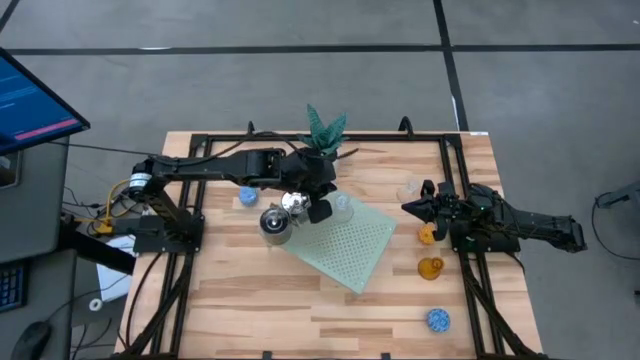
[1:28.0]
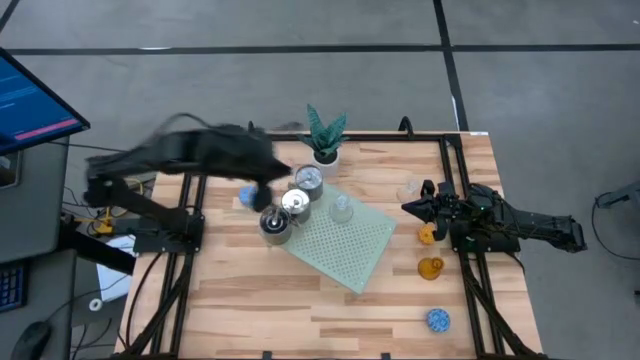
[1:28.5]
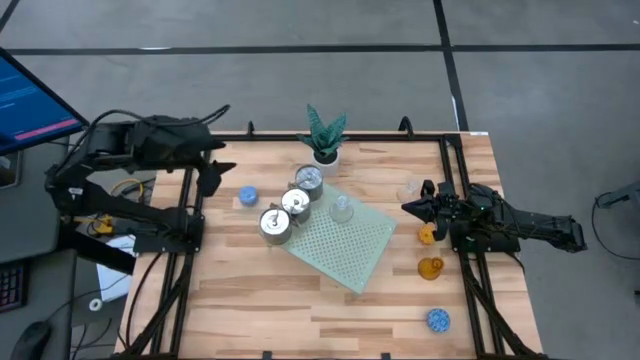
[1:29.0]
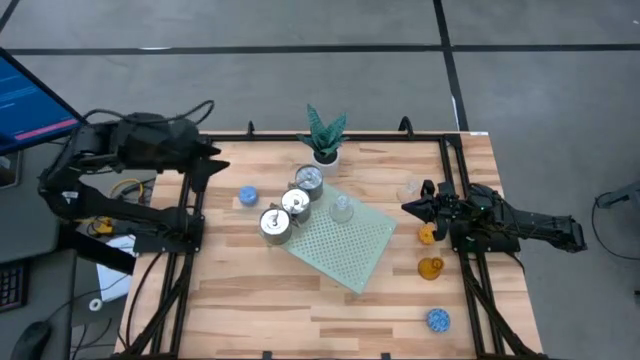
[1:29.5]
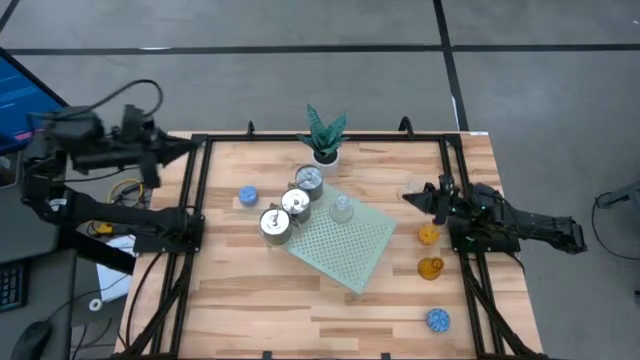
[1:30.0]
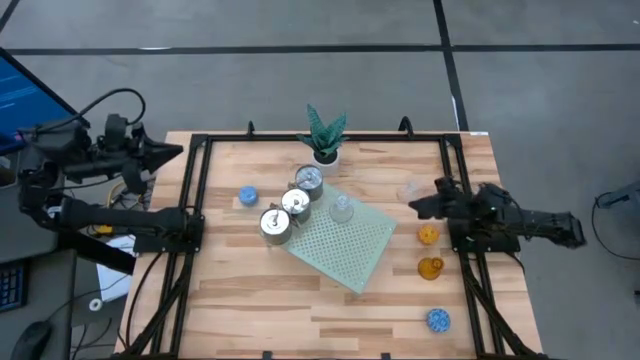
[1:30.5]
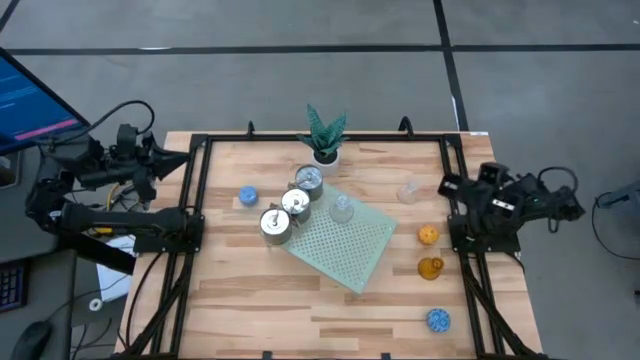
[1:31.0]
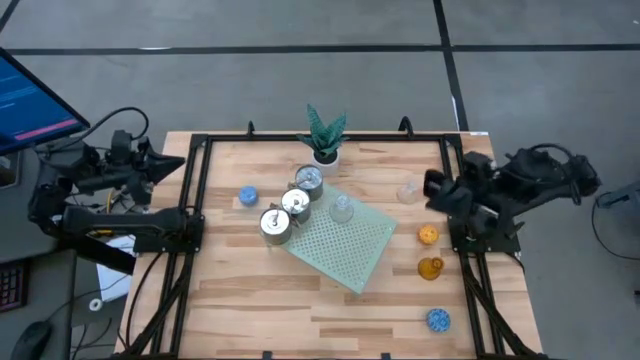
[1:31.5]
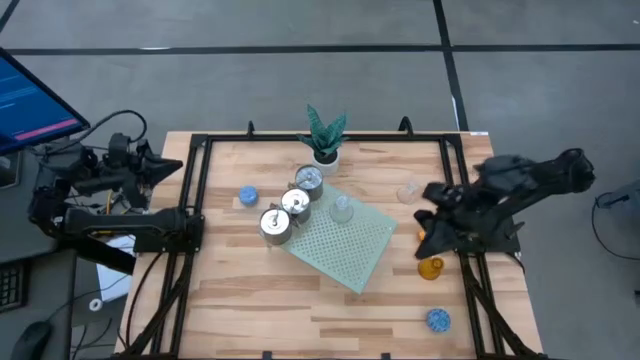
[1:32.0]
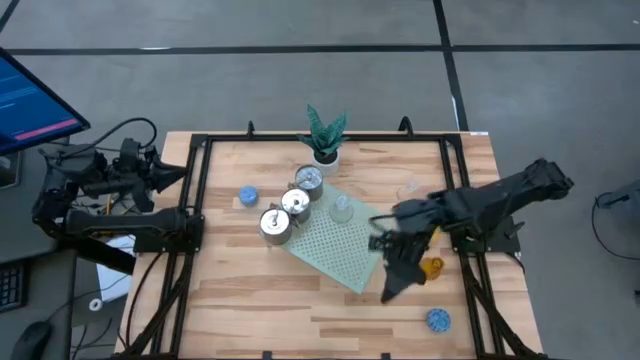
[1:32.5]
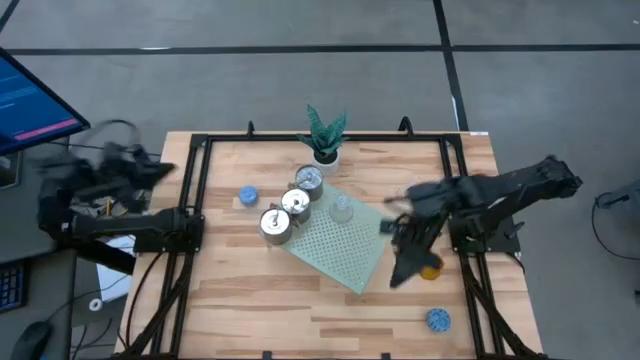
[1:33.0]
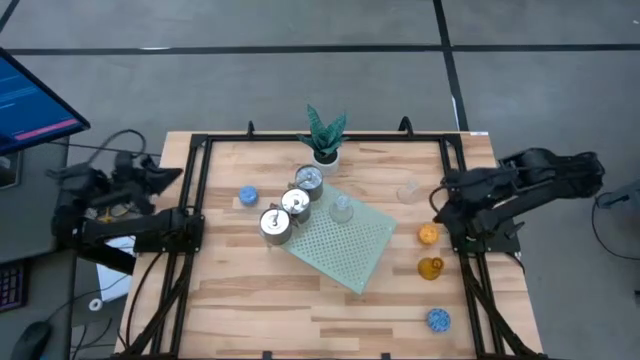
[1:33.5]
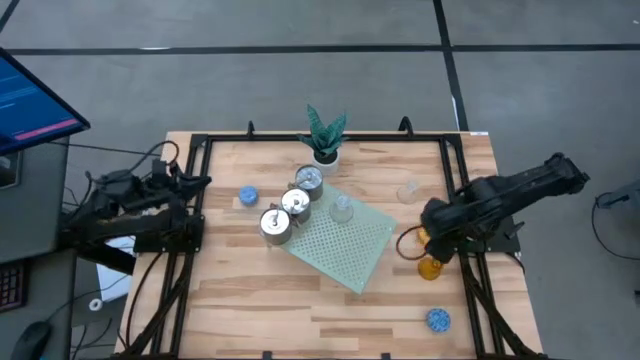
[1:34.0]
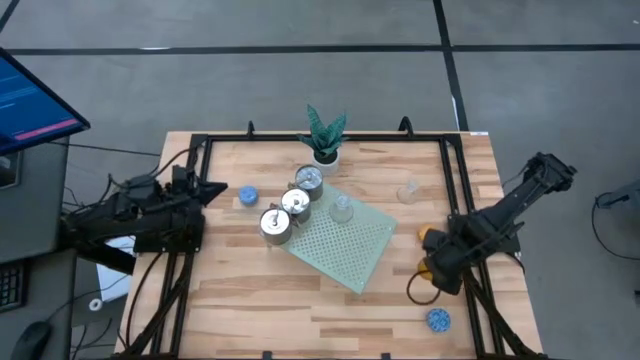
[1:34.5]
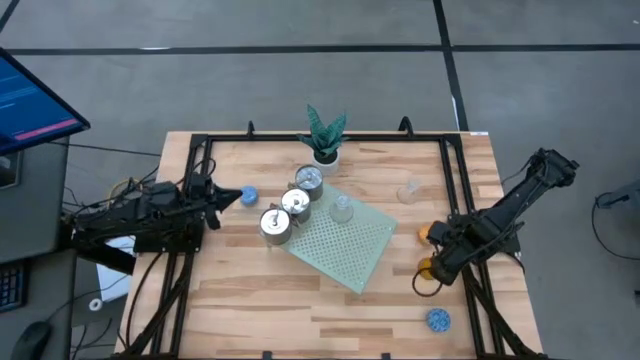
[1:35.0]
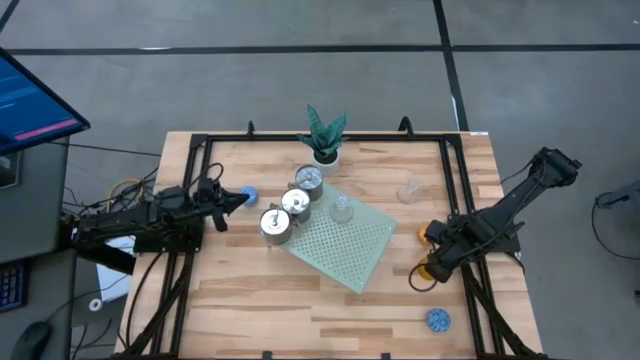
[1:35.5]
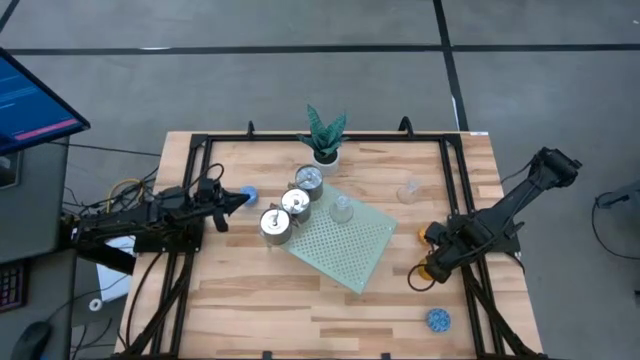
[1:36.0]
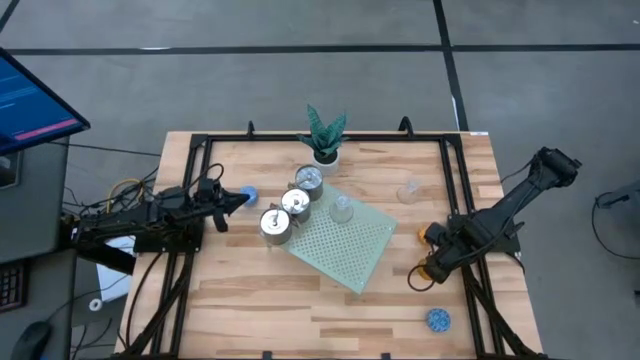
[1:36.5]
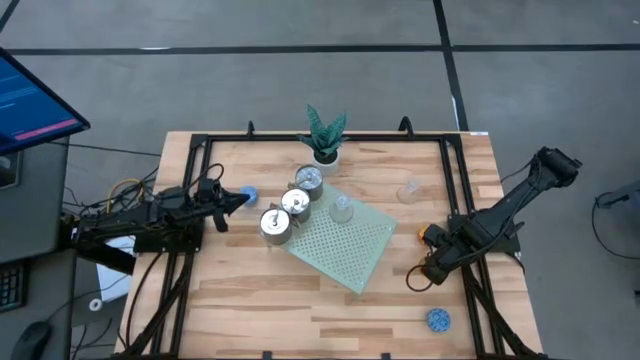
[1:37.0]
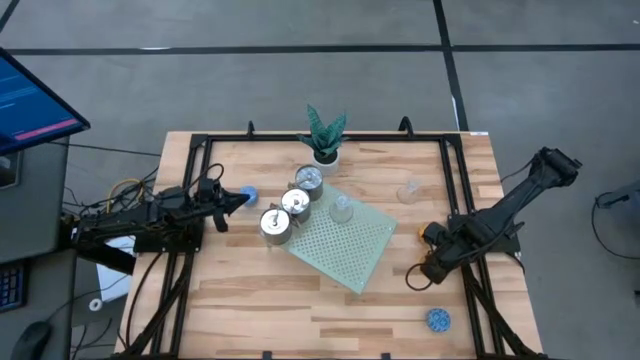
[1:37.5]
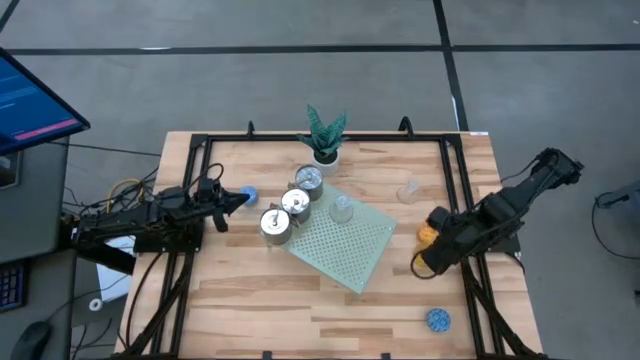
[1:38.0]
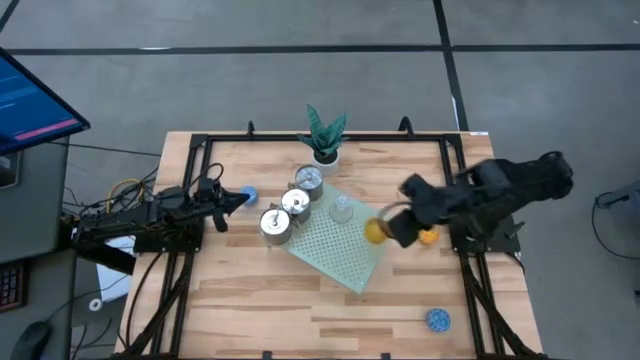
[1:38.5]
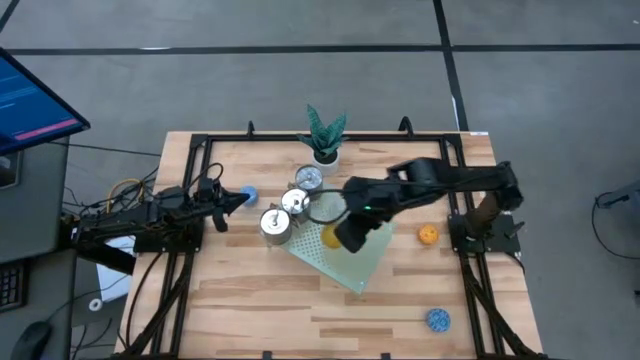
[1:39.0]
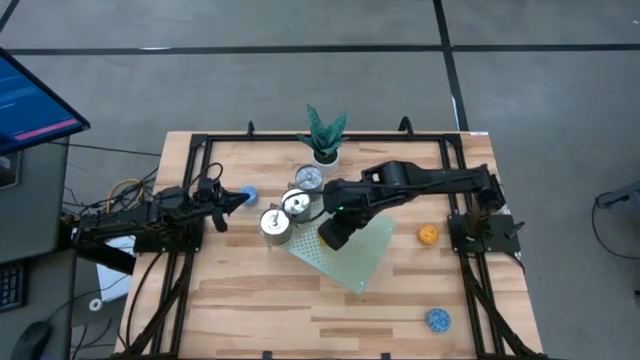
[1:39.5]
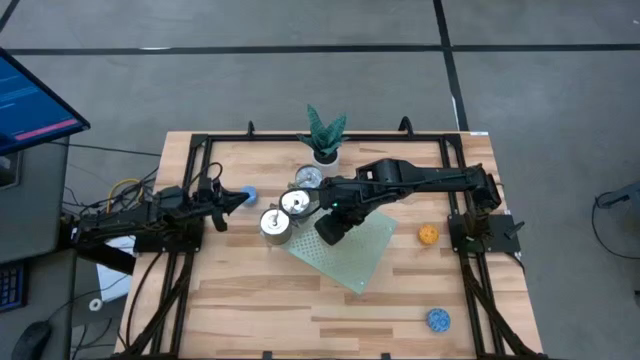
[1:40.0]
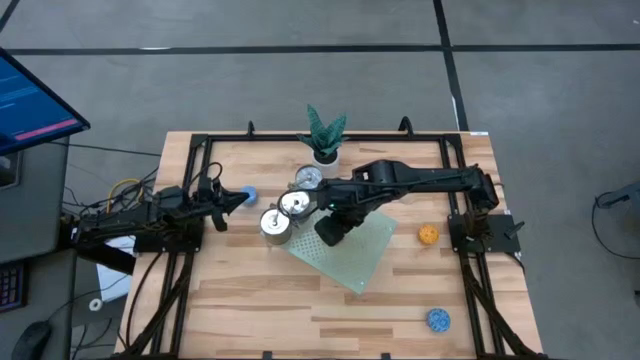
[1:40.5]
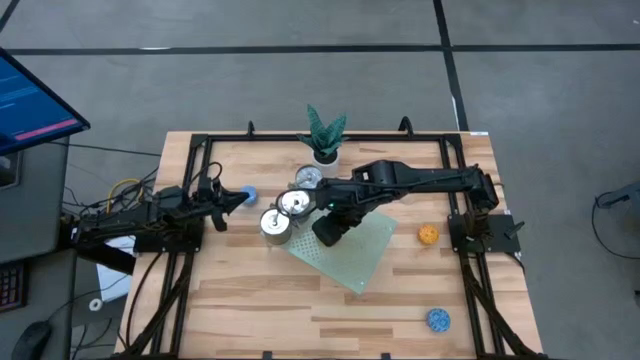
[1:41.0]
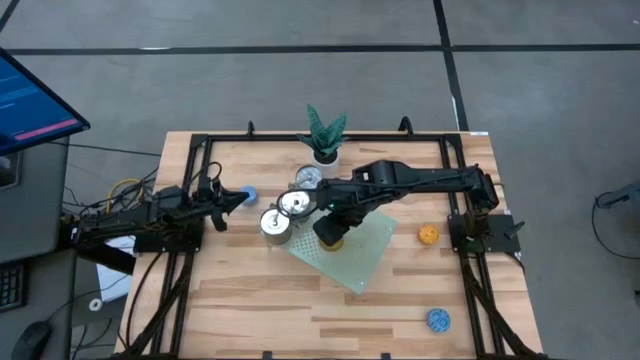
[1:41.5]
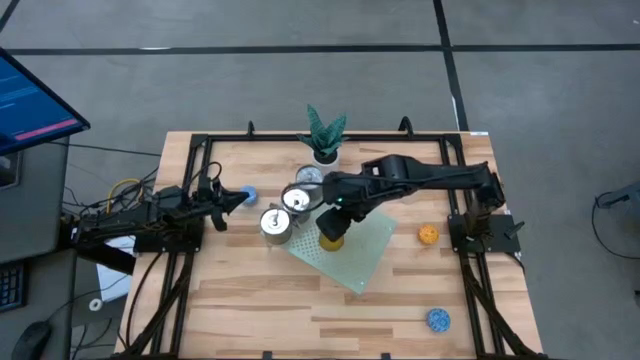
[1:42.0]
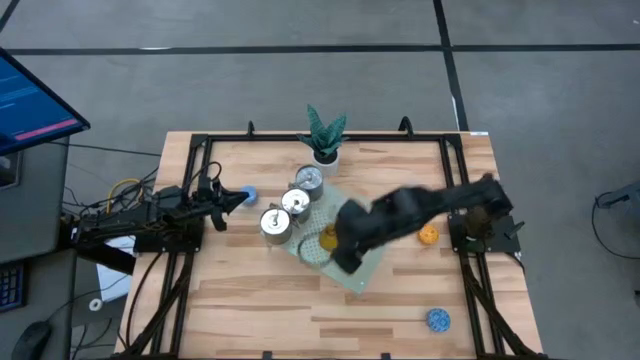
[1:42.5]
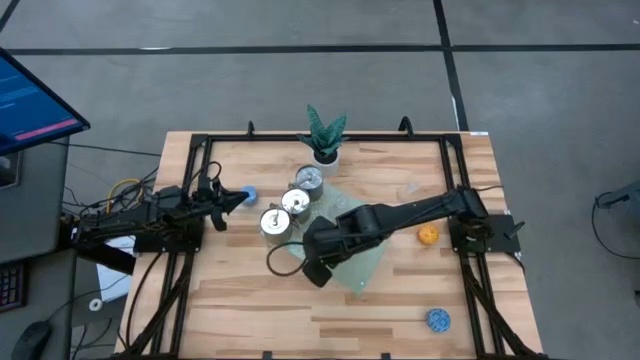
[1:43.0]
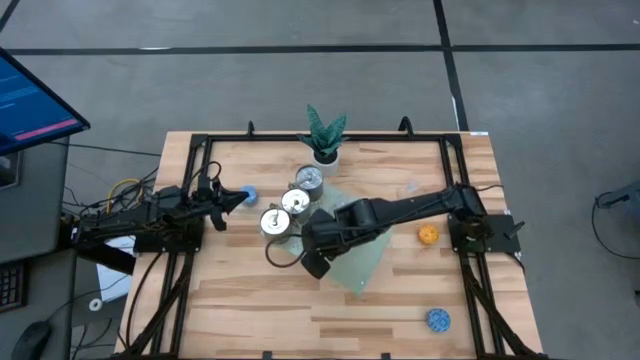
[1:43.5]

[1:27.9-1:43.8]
Task: Pick & Place candle stick holders
Put the yellow candle holder on the shelf

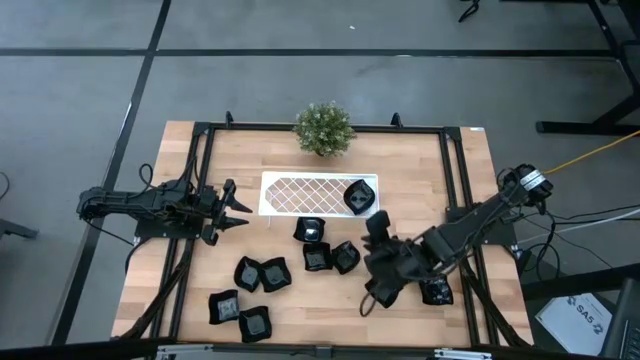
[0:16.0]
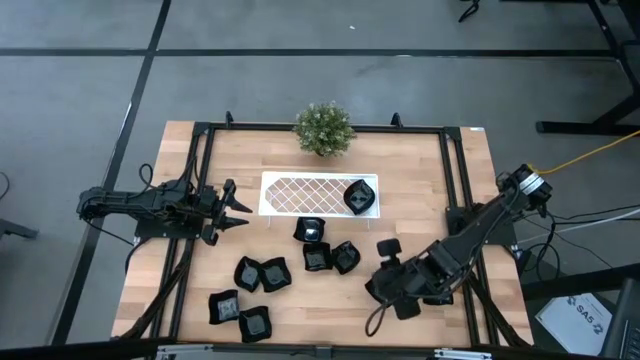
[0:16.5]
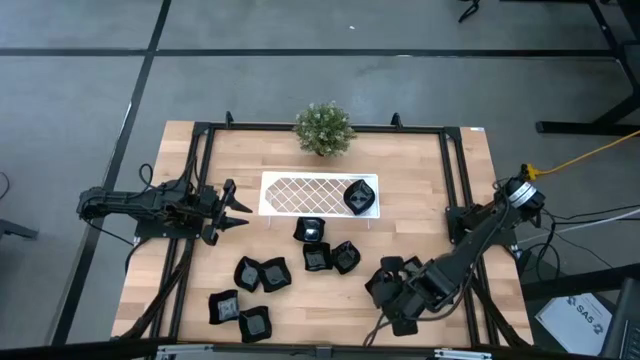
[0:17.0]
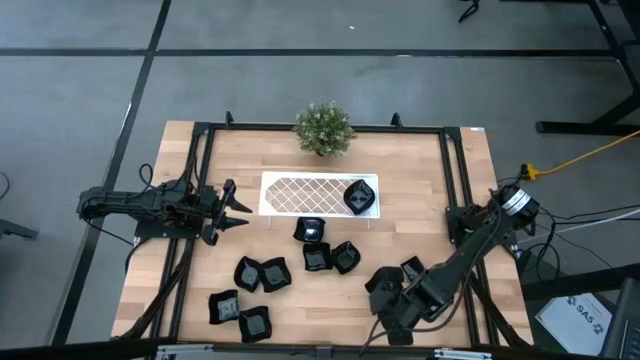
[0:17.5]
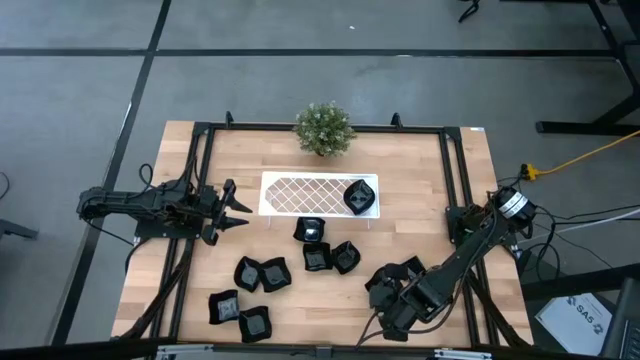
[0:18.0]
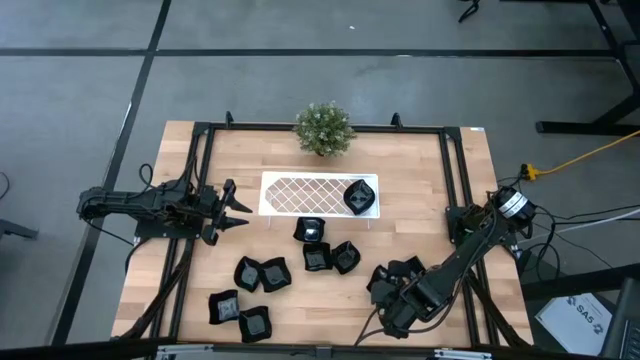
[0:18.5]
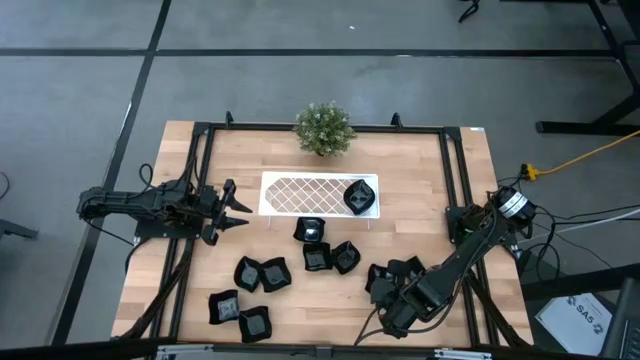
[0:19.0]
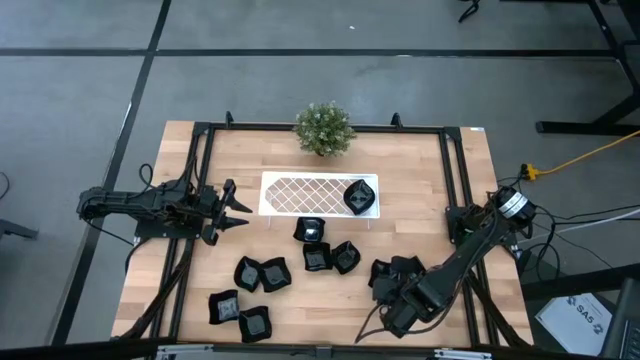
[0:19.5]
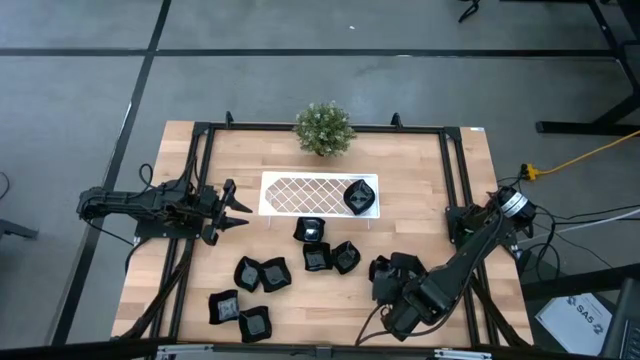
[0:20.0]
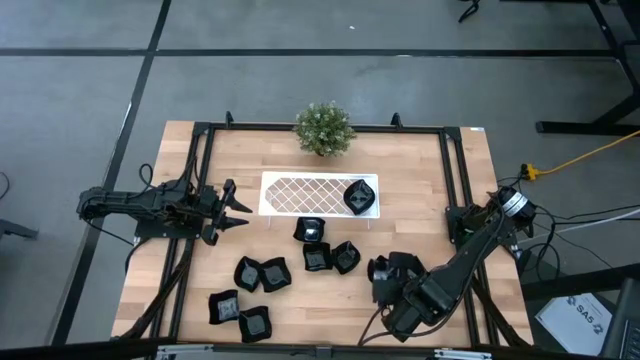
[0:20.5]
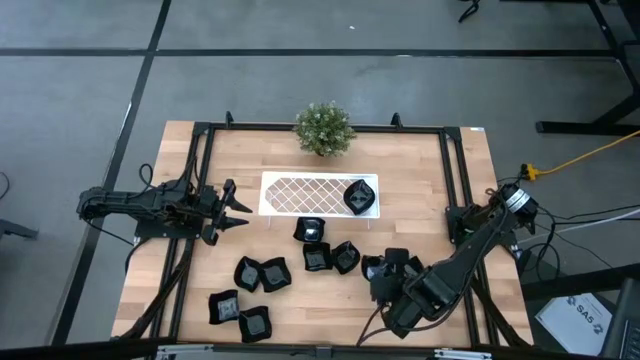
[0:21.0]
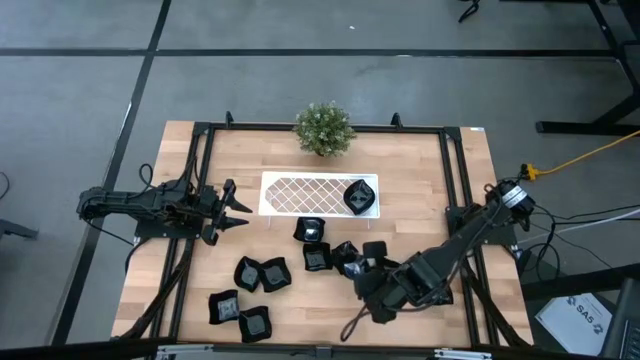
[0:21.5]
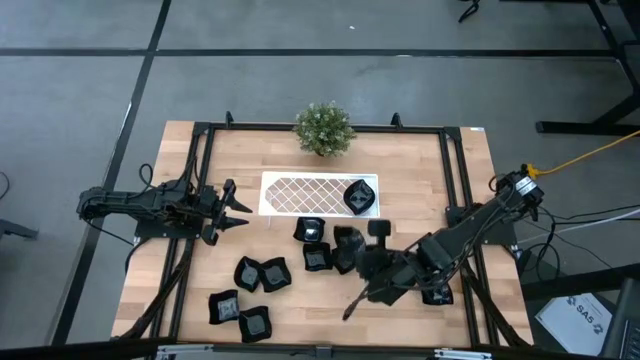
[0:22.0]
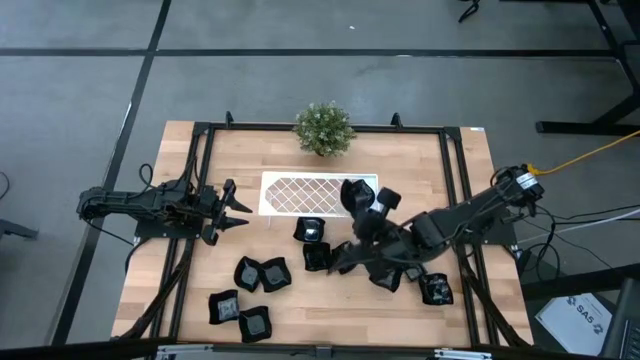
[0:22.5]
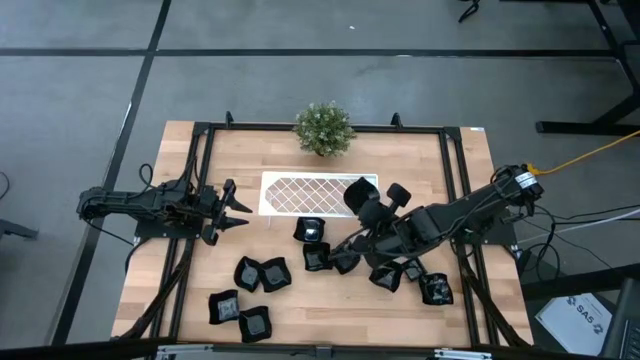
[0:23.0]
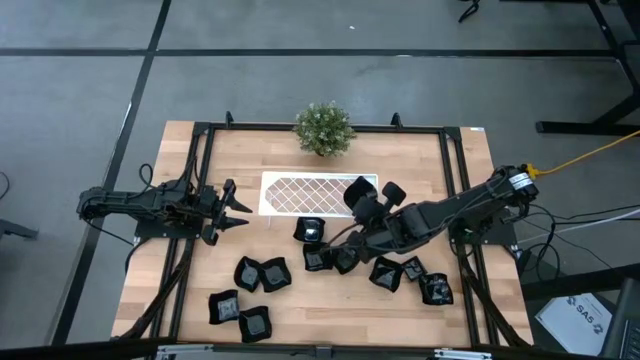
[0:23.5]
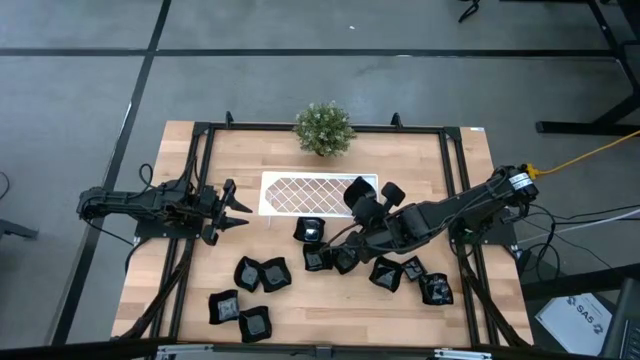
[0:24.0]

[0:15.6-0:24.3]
Task: Pick & Place Mini shaped plates
Stack the black leaf-shaped plate on top of the black leaf-shaped plate on the shelf
